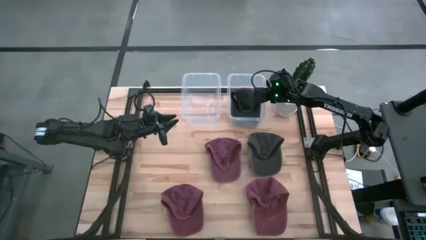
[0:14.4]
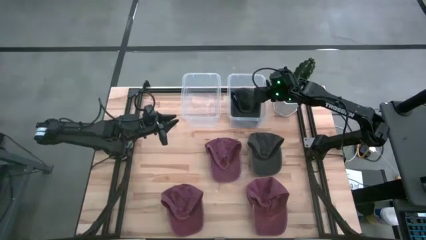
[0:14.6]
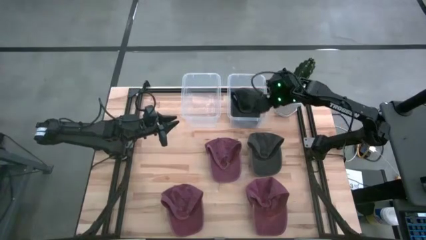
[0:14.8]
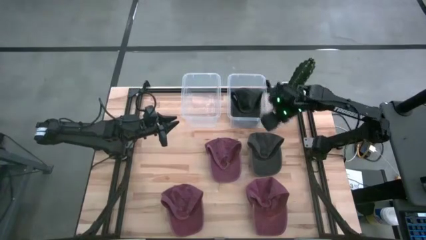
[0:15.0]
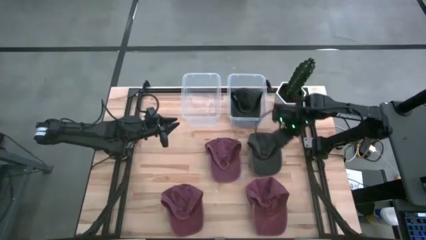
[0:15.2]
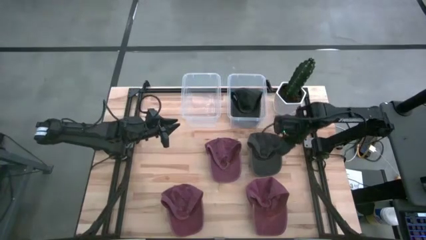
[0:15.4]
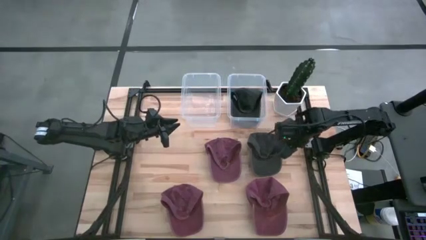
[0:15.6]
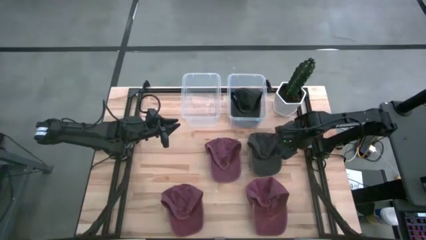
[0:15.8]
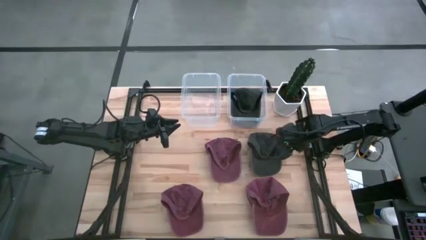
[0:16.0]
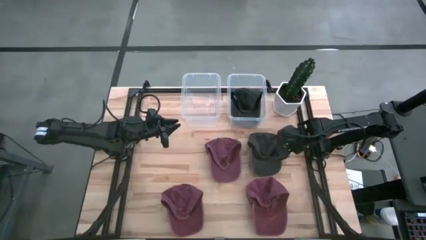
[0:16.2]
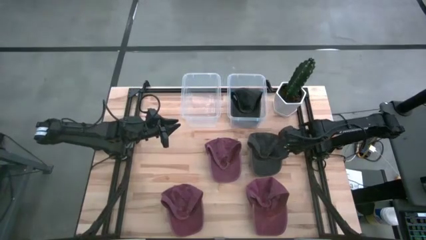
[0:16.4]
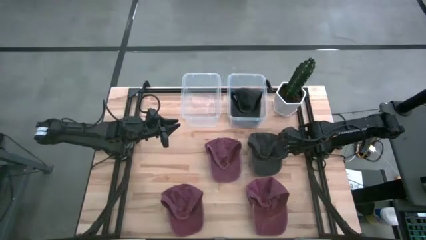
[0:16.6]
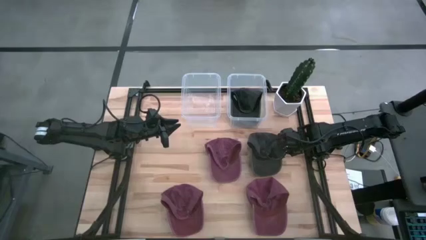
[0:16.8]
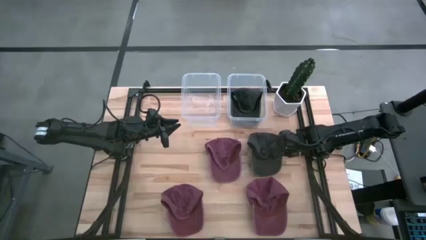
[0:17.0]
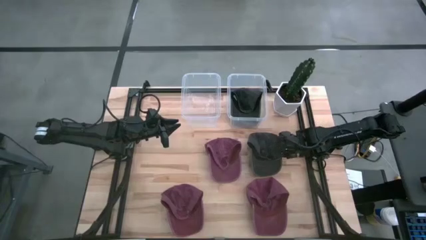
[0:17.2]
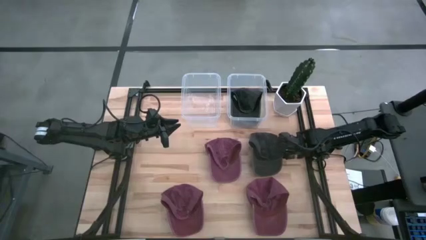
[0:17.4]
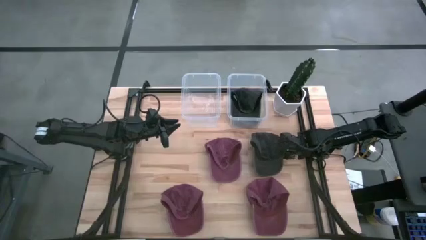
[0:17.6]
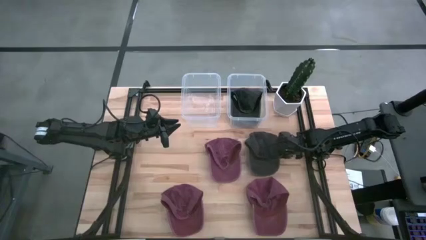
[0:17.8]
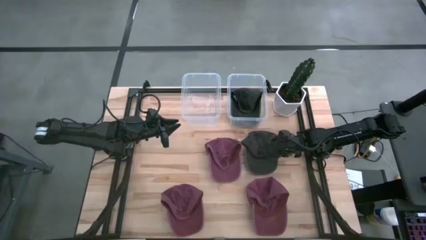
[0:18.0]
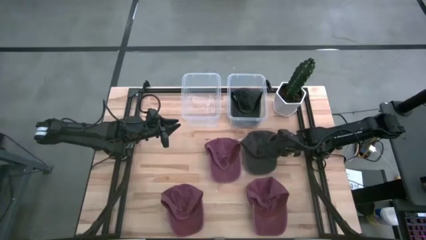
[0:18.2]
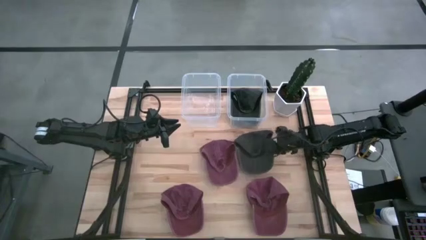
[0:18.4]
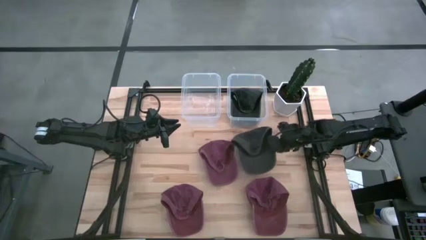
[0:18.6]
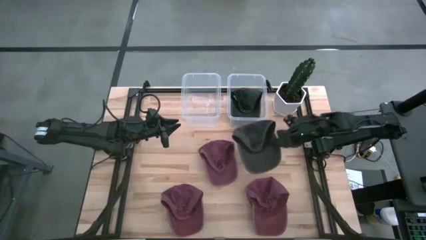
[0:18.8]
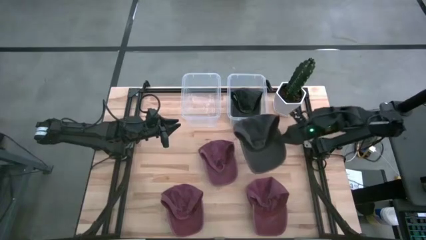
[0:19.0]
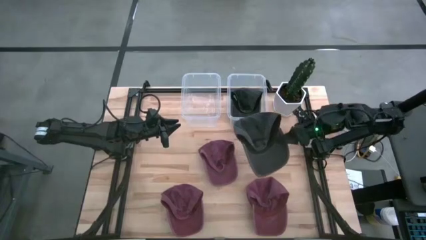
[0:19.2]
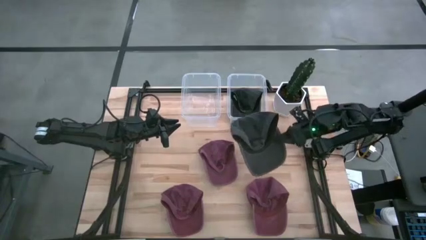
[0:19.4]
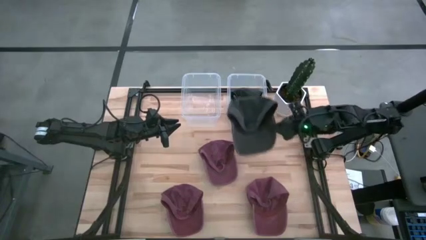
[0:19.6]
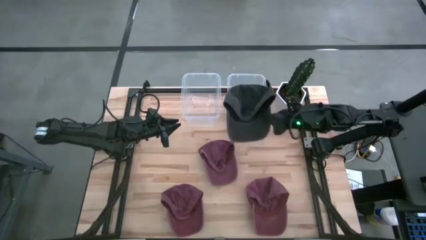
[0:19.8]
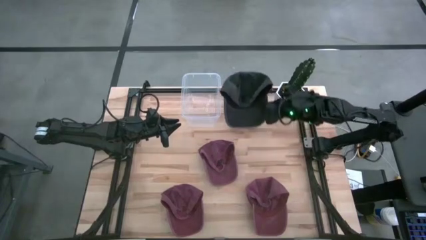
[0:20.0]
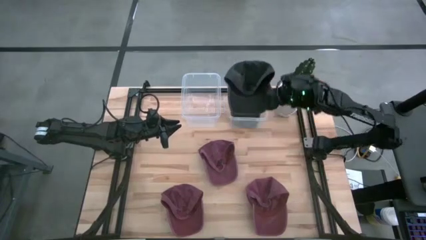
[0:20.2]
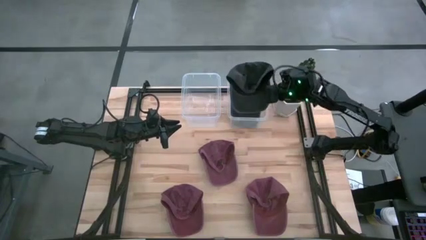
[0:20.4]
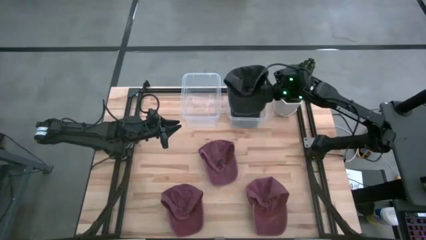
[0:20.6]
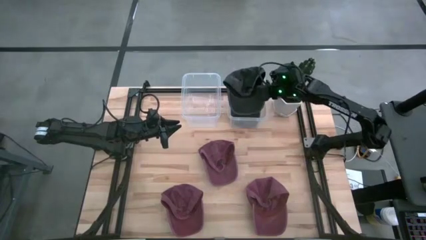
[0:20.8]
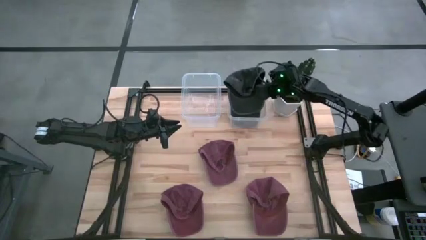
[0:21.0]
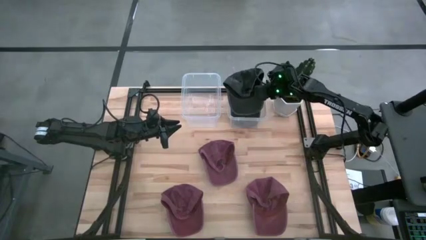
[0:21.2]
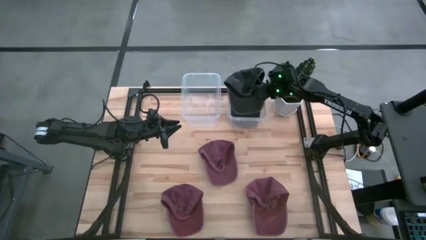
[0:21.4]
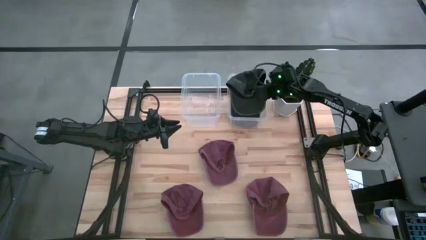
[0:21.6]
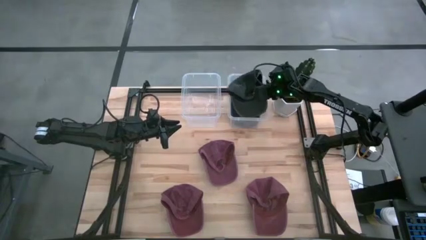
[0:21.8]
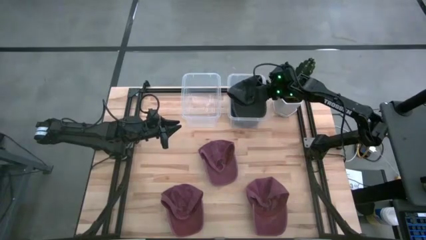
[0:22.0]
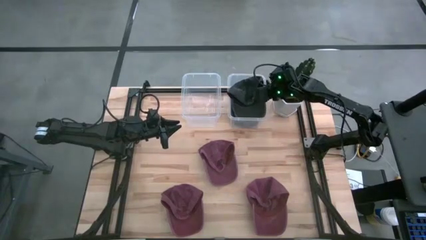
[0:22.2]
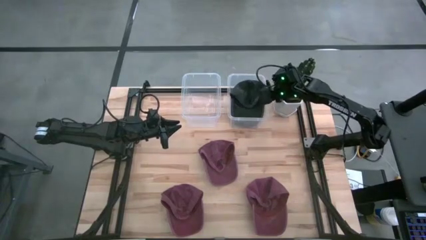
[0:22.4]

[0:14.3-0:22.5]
Task: Pick & Place hat
Put the black cap into the right transparent bin
